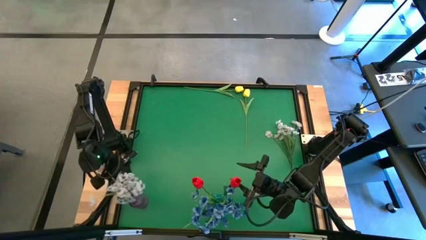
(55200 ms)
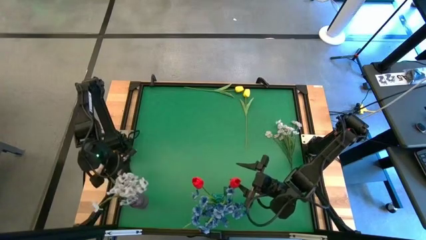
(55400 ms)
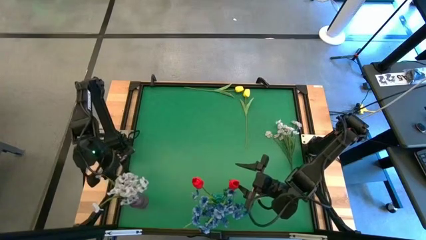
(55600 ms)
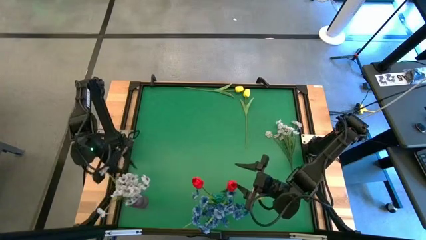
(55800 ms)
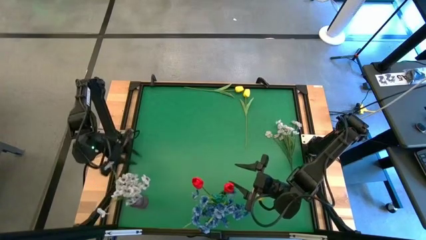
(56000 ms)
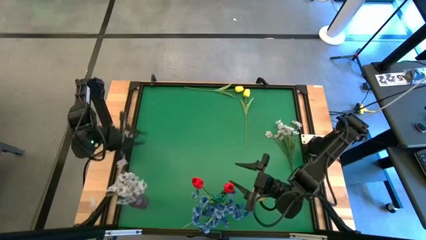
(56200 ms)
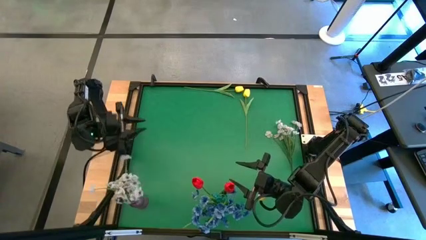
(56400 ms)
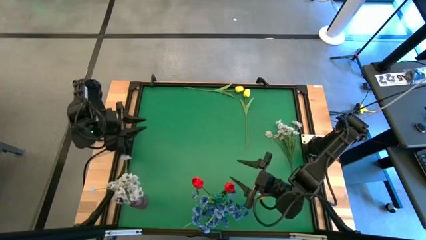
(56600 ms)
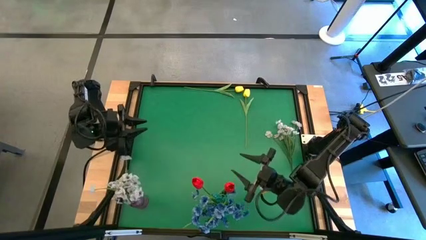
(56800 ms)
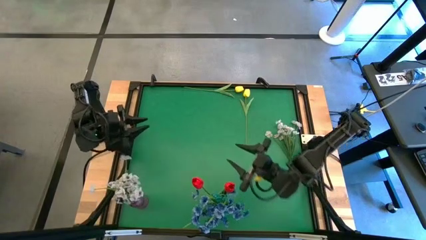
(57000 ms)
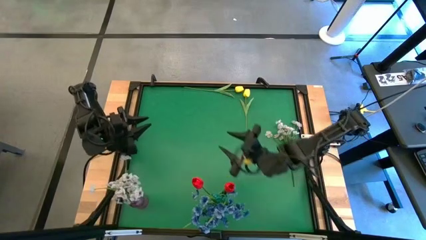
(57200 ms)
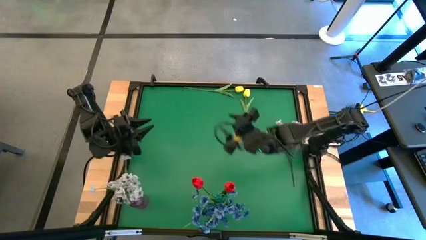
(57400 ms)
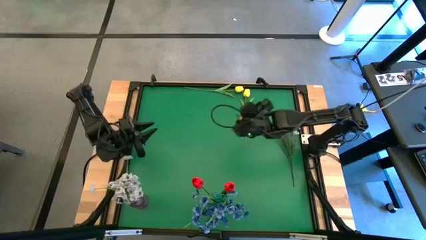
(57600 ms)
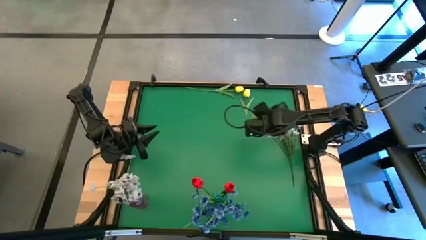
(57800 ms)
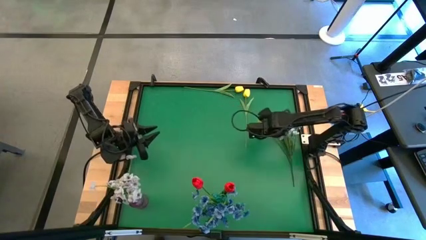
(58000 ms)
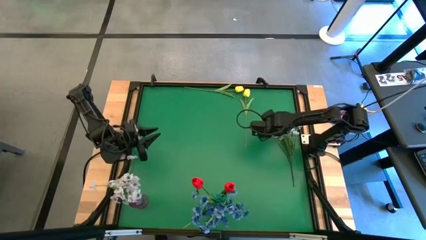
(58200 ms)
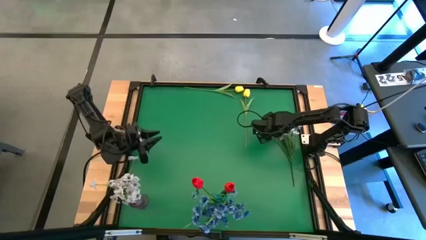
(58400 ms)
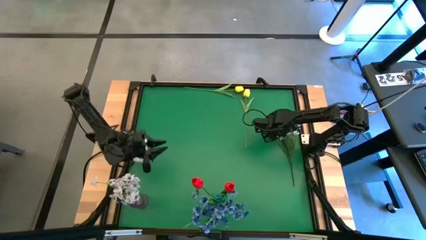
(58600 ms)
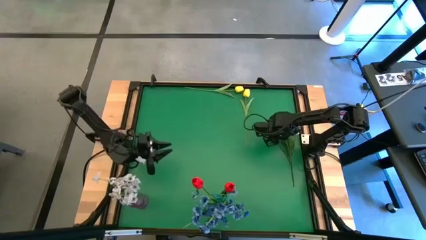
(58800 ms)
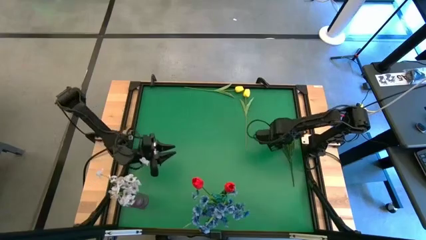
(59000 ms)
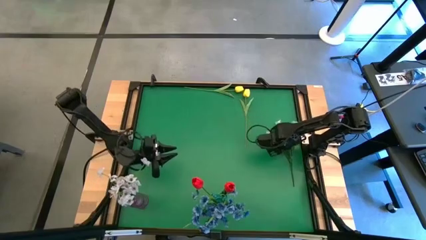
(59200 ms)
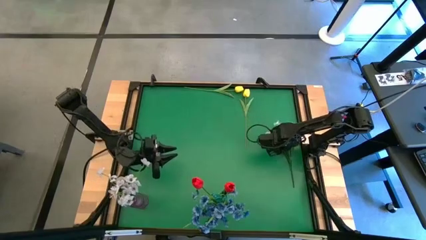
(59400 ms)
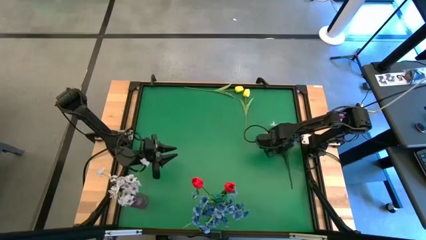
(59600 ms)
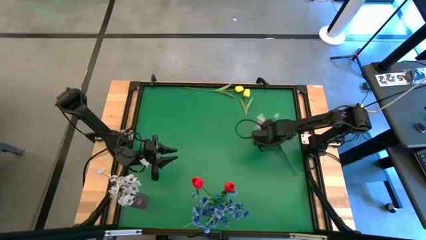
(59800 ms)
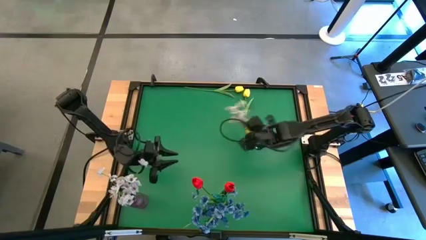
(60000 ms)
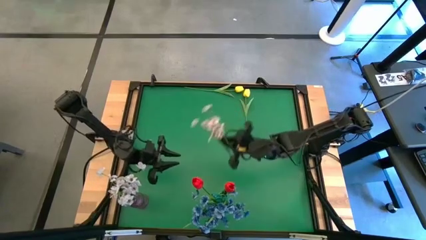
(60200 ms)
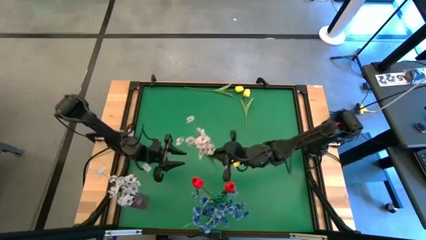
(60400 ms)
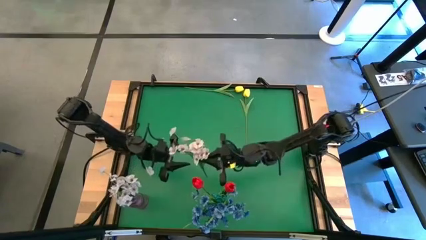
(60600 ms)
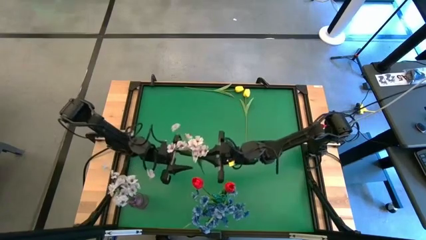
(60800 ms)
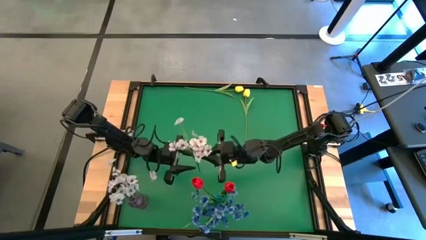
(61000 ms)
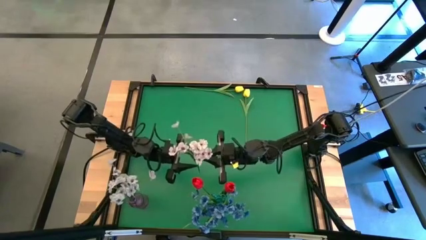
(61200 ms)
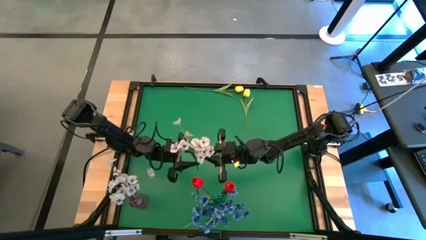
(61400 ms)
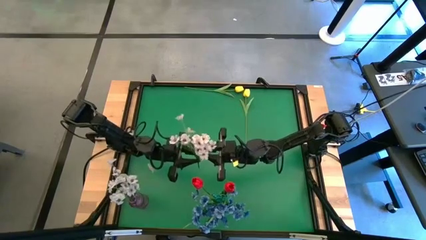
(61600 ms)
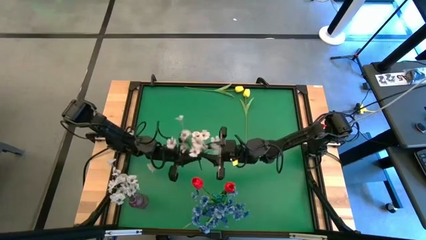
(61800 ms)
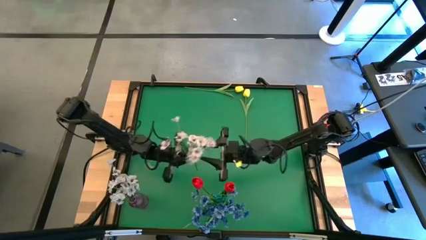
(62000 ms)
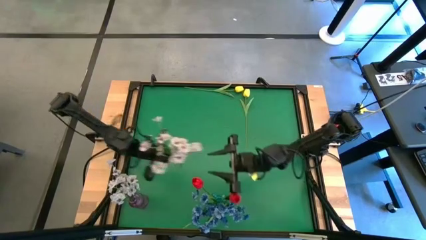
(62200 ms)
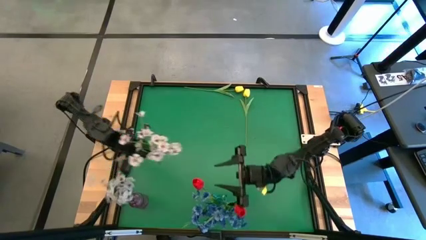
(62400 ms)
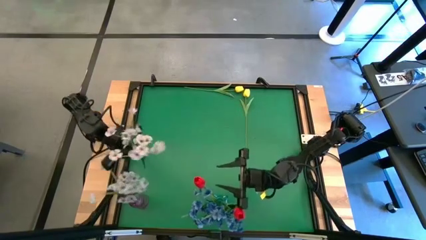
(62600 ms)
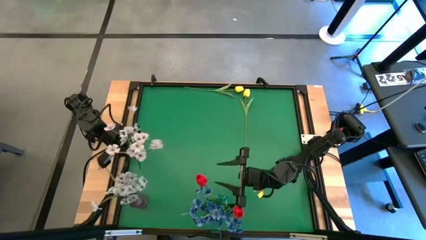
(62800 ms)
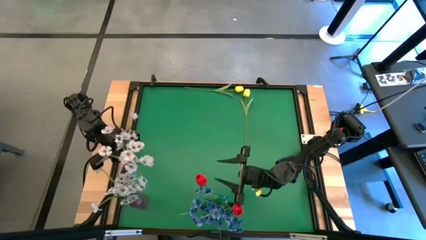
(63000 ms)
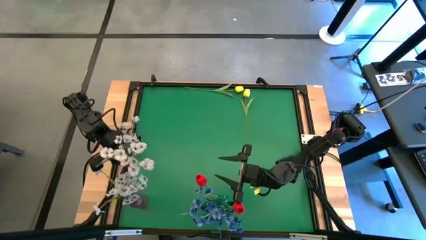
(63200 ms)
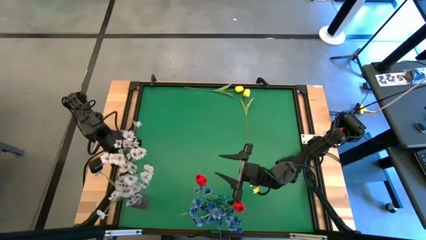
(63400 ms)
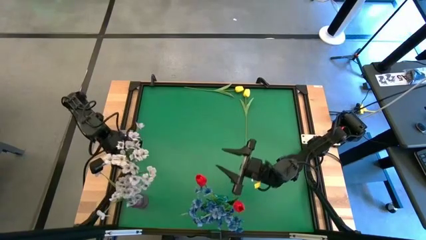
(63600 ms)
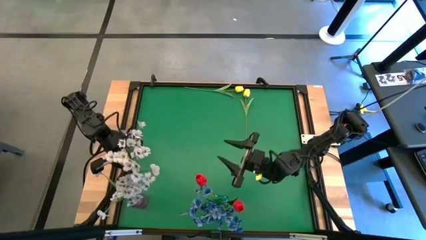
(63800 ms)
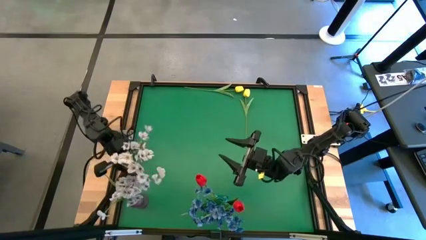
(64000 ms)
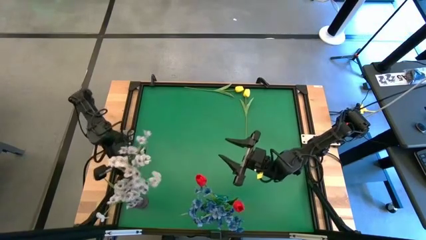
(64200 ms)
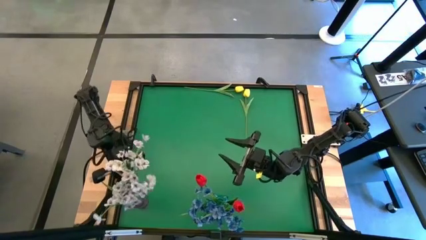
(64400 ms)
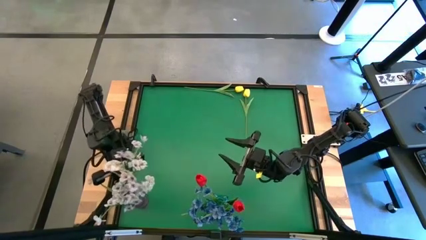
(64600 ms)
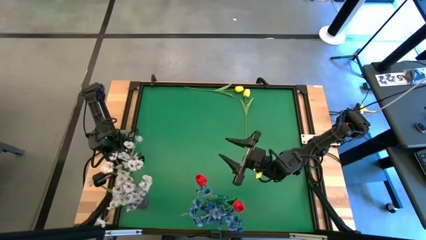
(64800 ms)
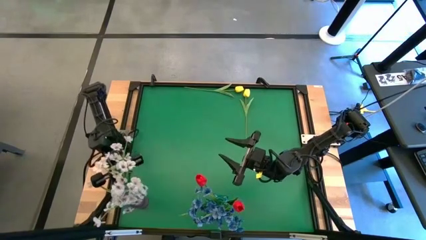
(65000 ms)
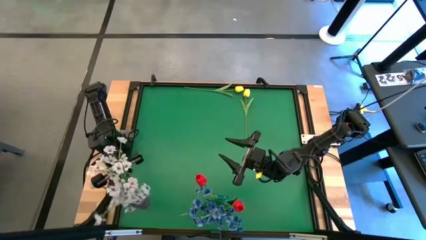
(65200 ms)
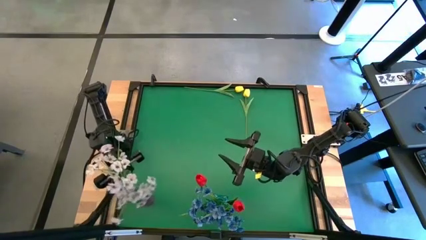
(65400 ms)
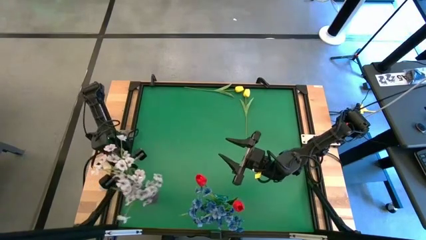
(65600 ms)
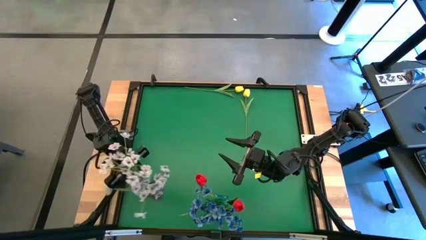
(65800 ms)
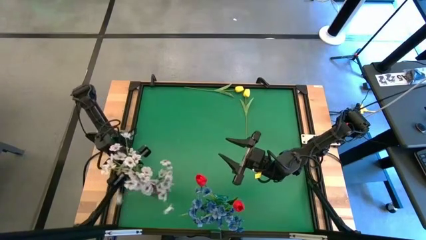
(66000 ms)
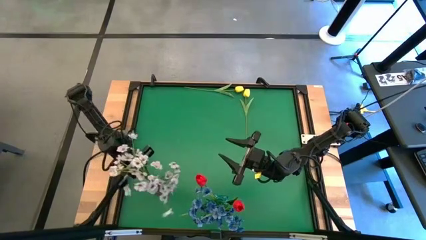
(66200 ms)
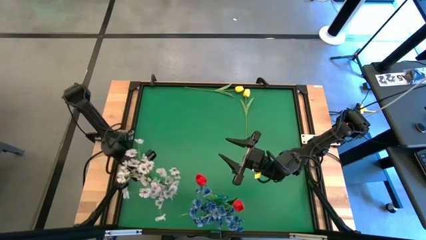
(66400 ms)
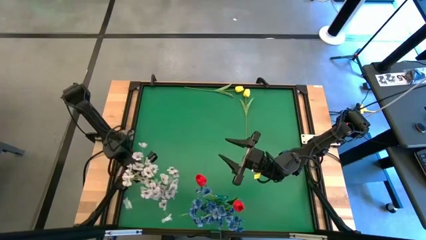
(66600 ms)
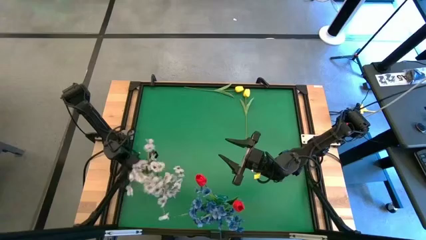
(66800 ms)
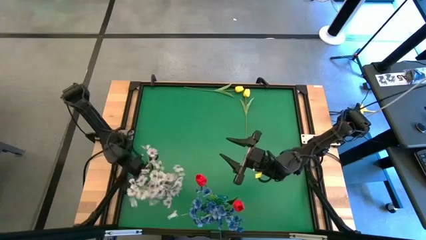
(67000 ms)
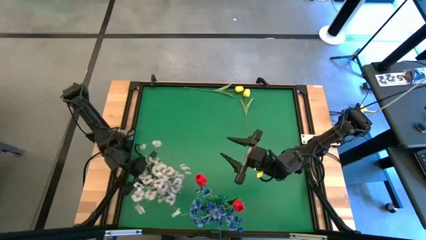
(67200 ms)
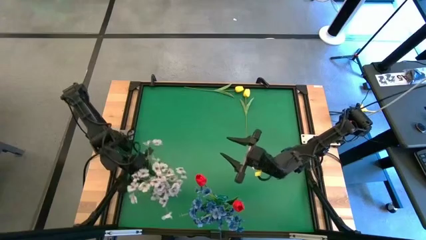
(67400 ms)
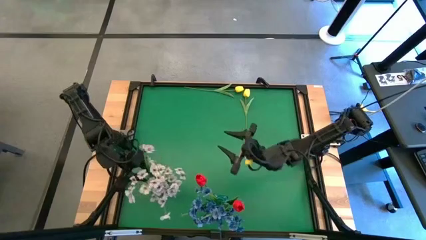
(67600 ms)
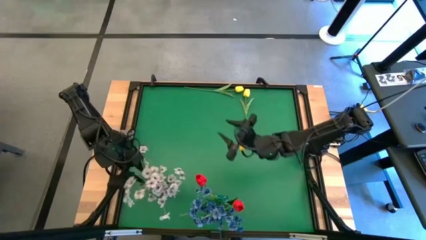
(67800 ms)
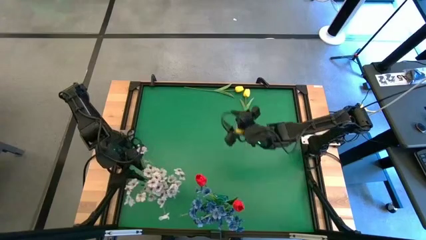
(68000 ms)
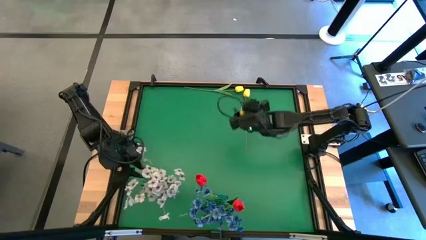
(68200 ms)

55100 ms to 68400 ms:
Task: Sort flowers into vase by color
Put the white flower into the purple vase

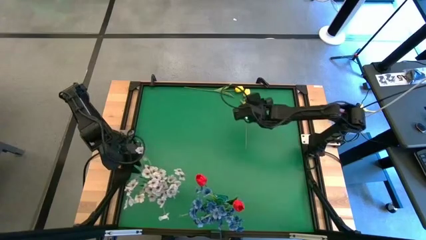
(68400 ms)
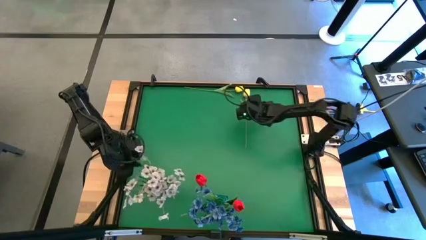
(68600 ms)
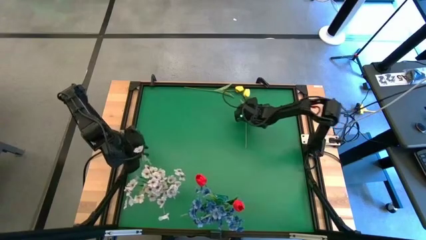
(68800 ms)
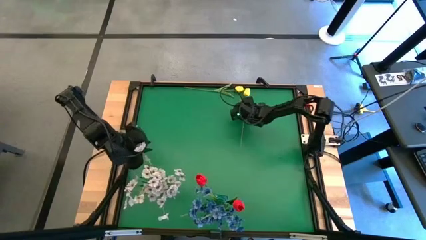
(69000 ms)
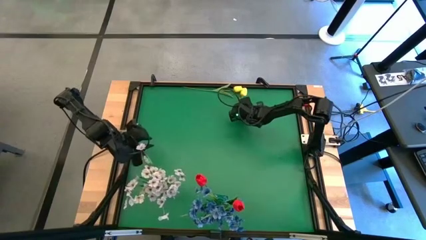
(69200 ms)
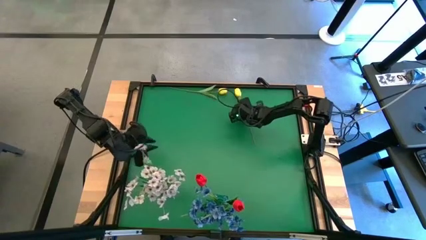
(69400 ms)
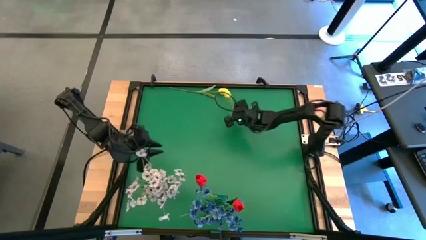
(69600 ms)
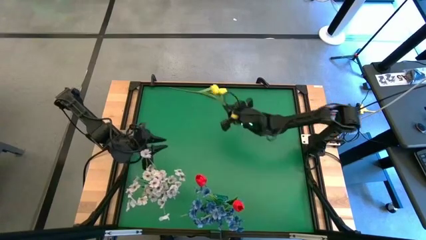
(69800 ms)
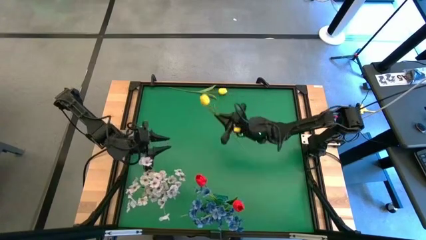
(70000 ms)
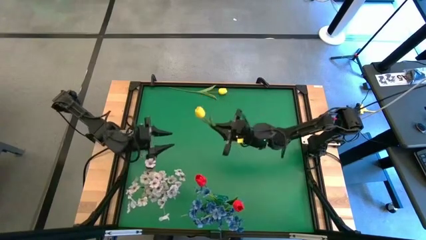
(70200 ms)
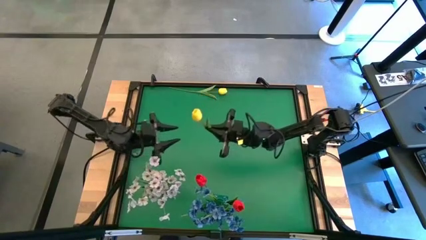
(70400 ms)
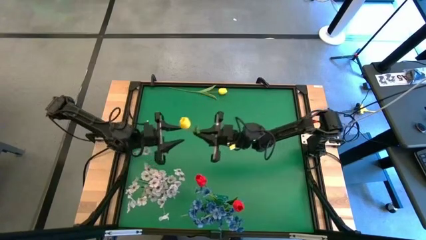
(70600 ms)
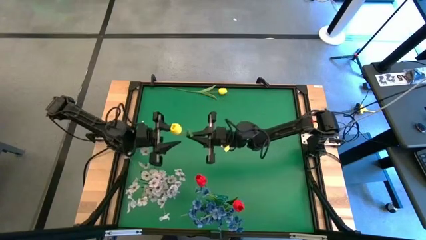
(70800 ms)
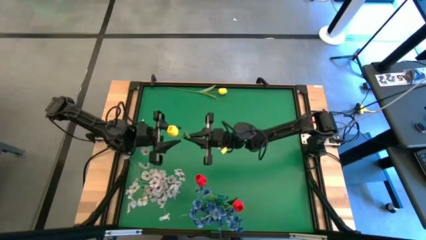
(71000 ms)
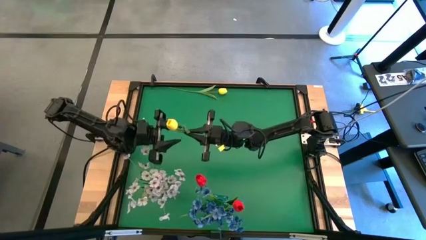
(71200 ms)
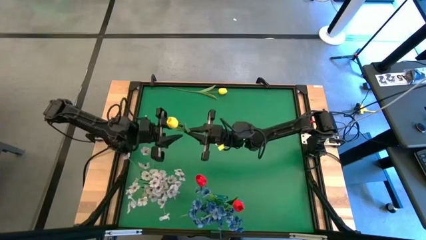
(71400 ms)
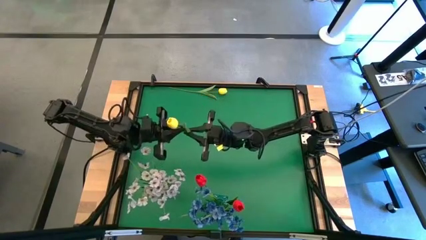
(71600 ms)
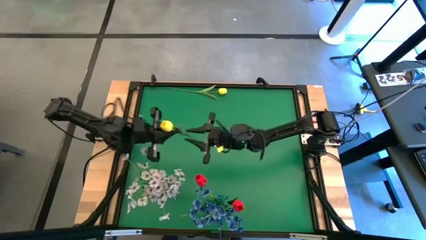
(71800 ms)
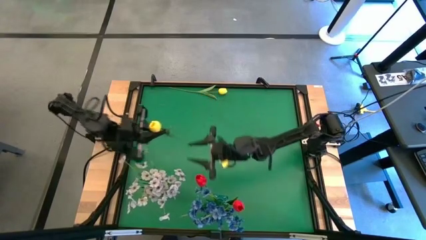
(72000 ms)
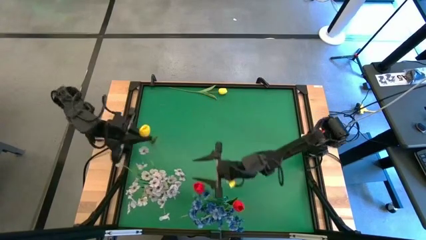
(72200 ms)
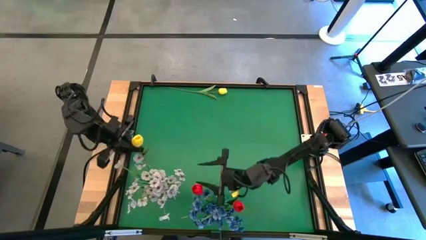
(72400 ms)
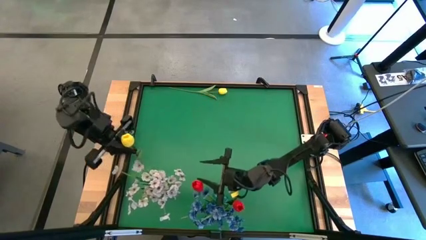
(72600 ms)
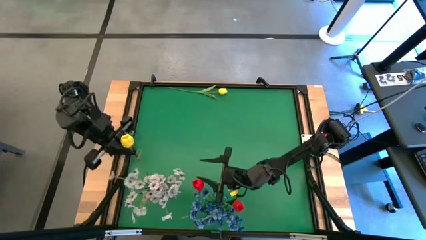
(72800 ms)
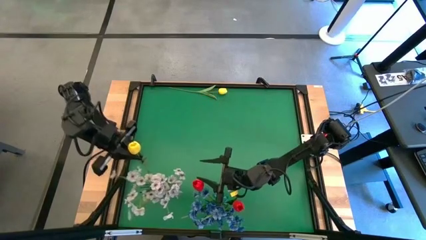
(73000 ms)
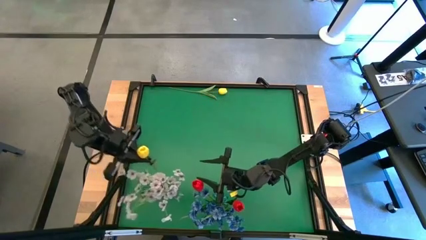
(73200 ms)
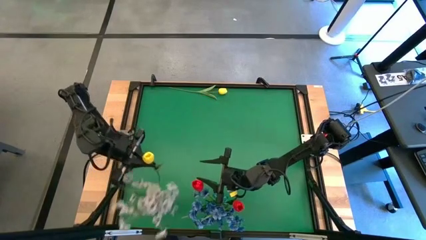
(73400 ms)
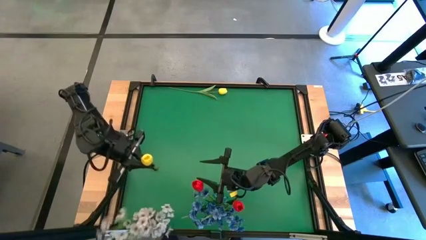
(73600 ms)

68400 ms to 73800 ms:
Put the bottom yellow flower into the purple vase
